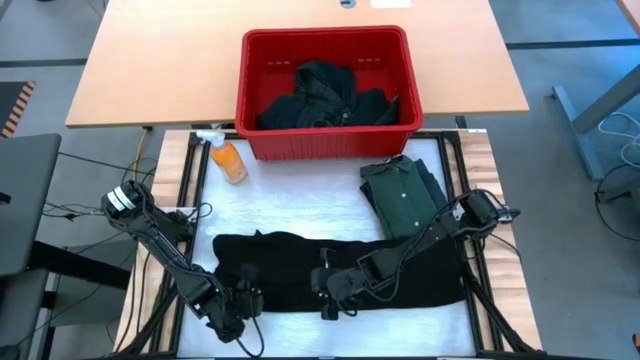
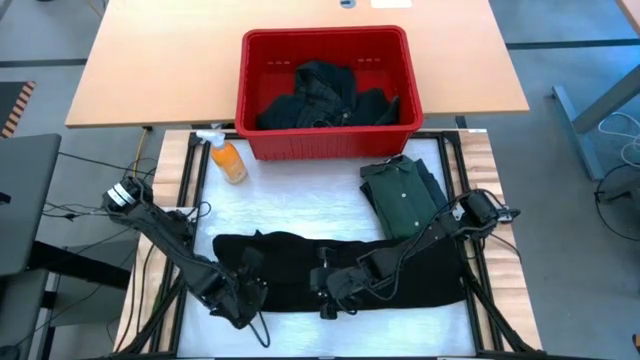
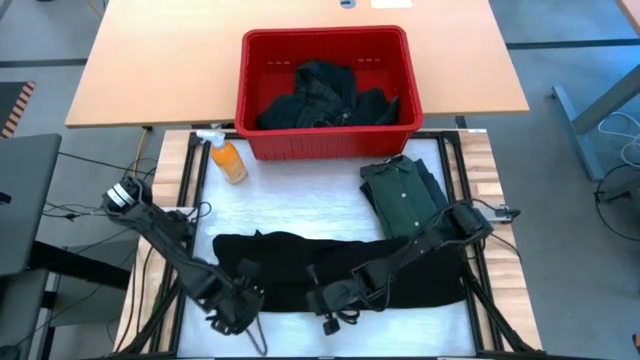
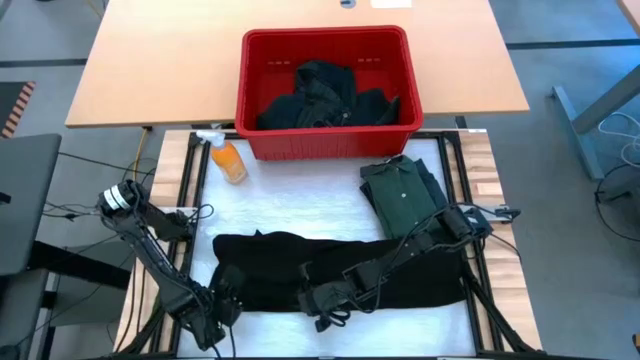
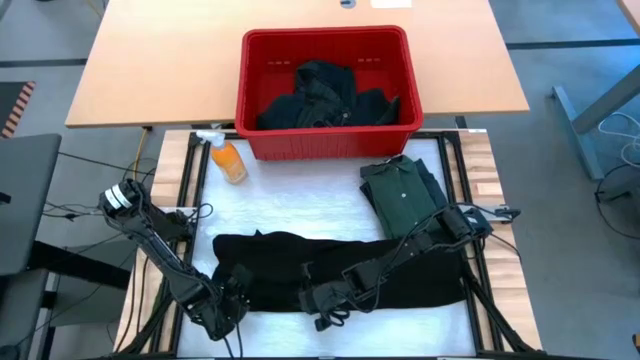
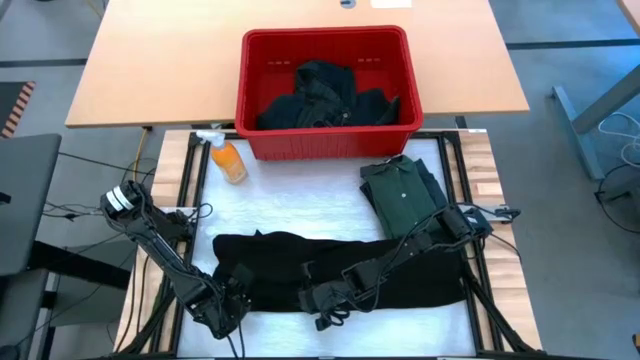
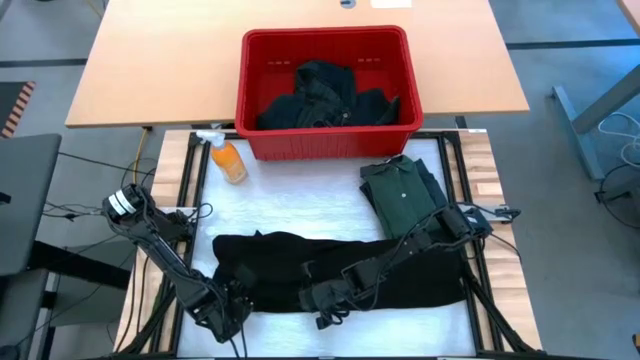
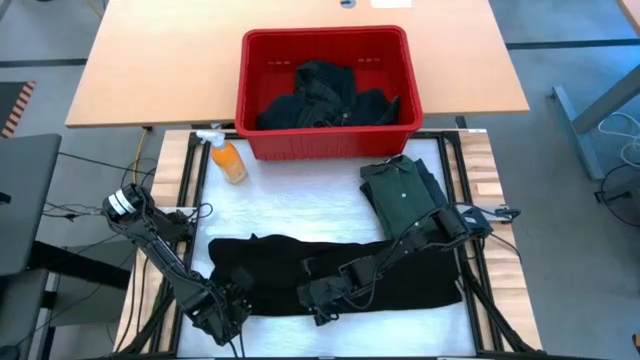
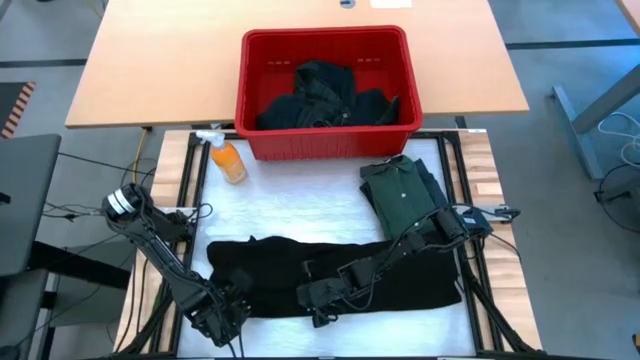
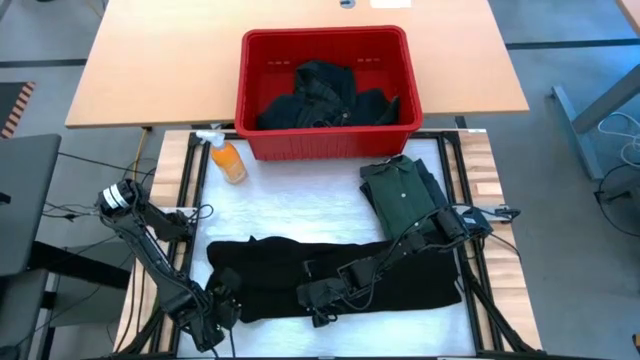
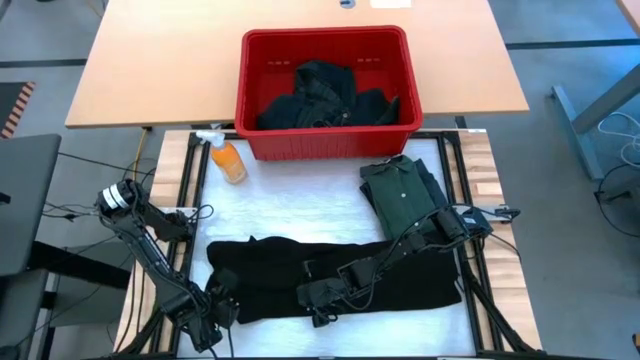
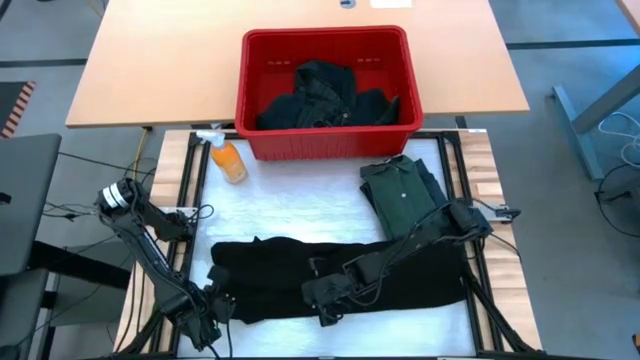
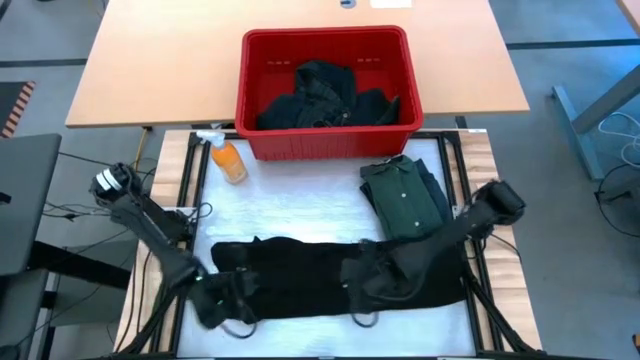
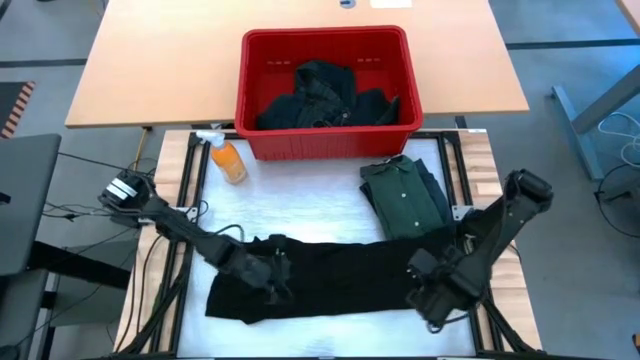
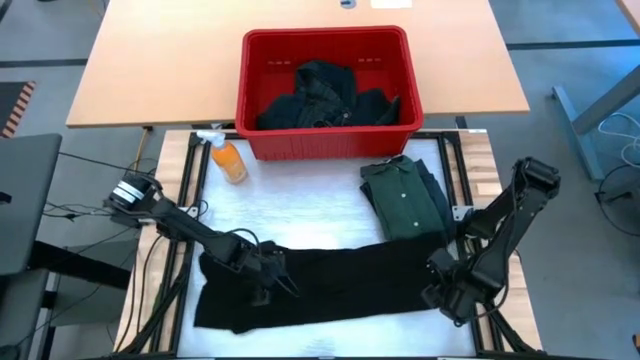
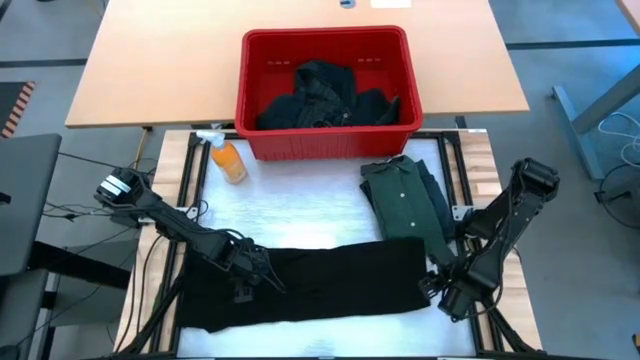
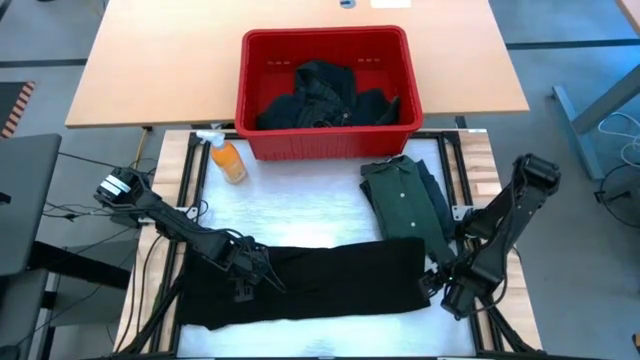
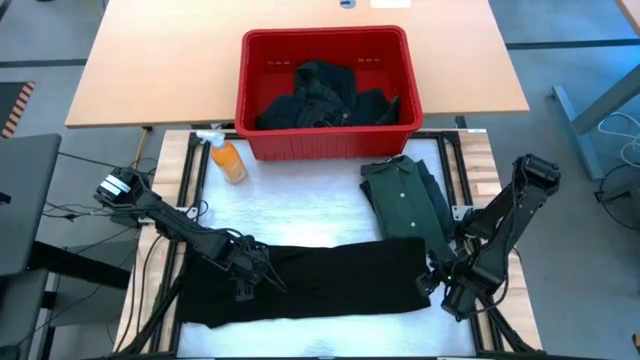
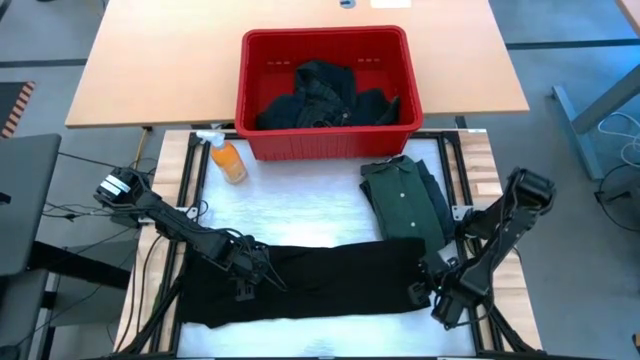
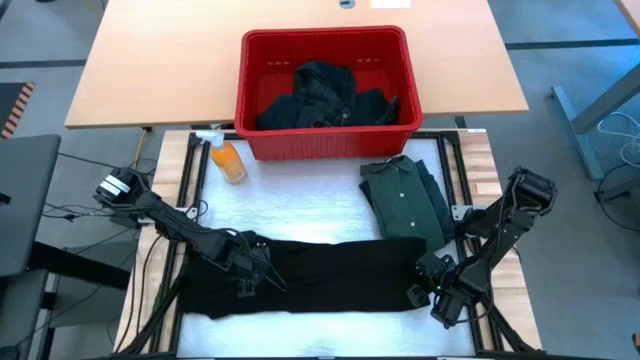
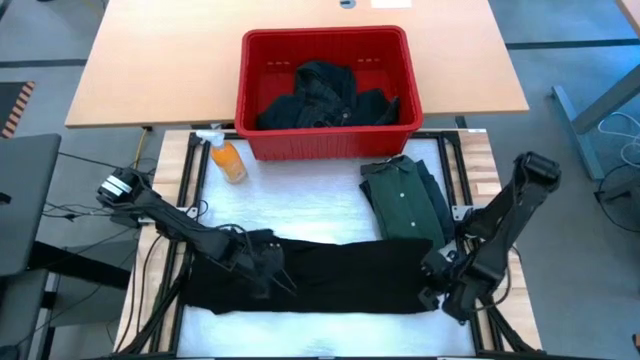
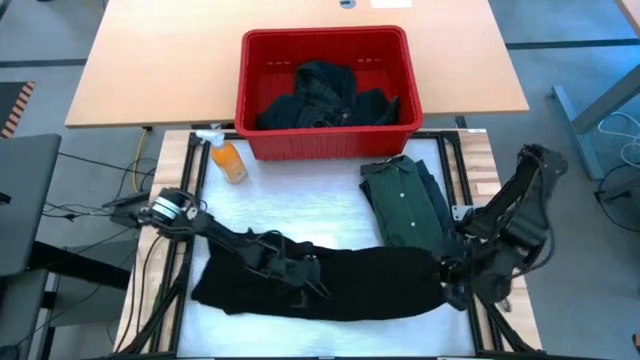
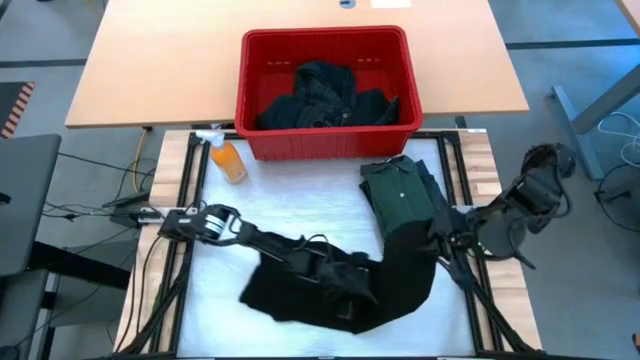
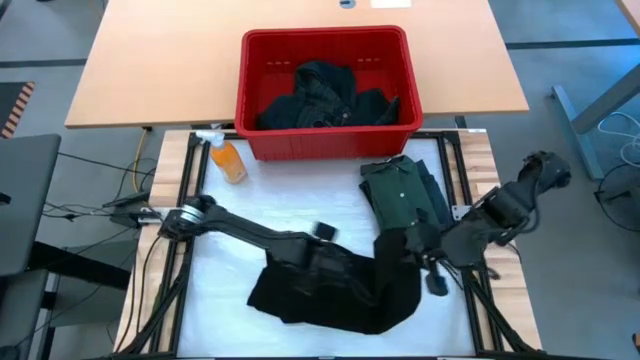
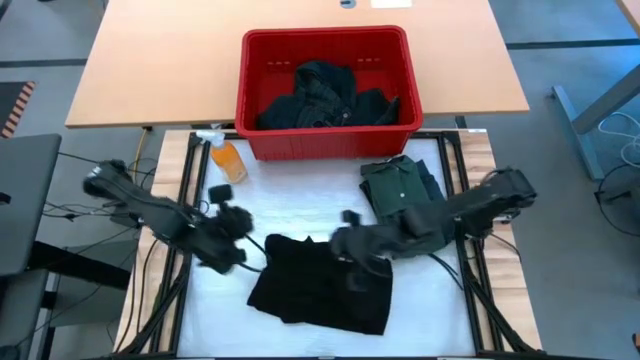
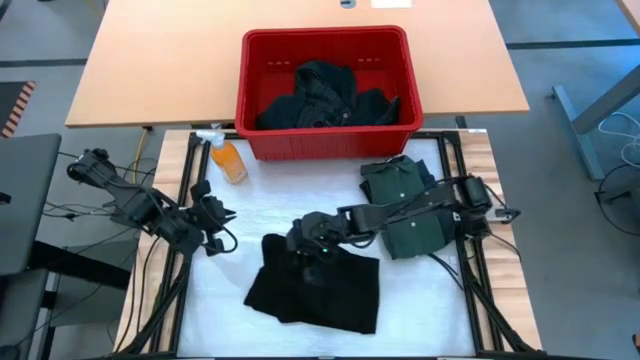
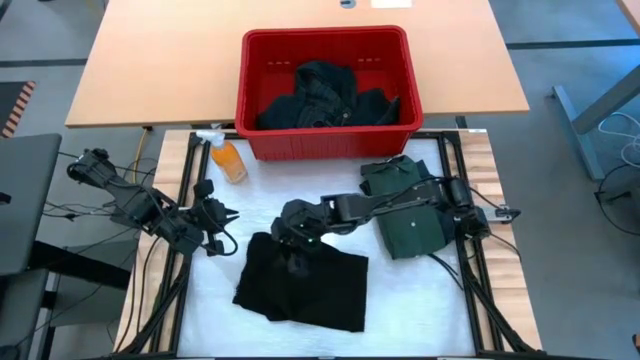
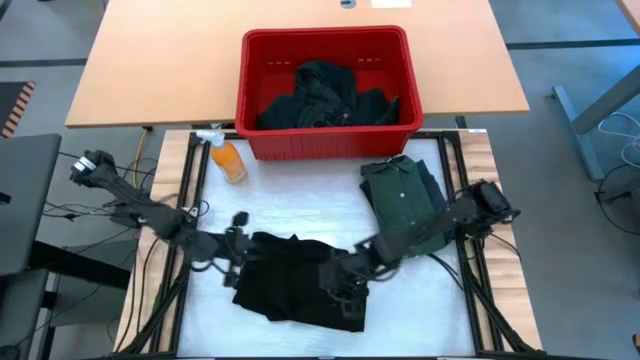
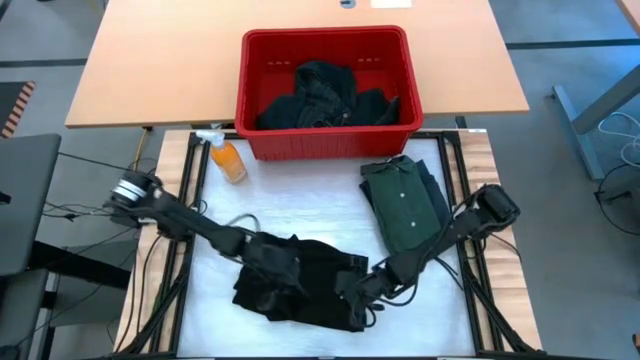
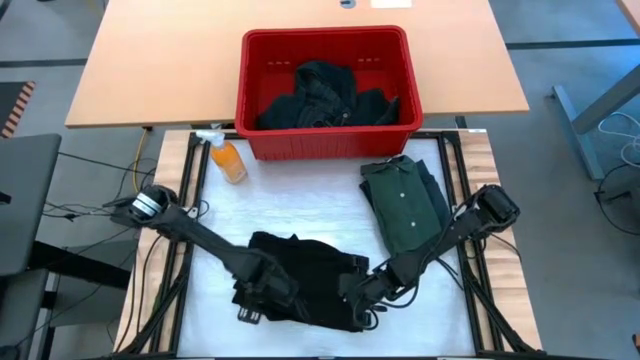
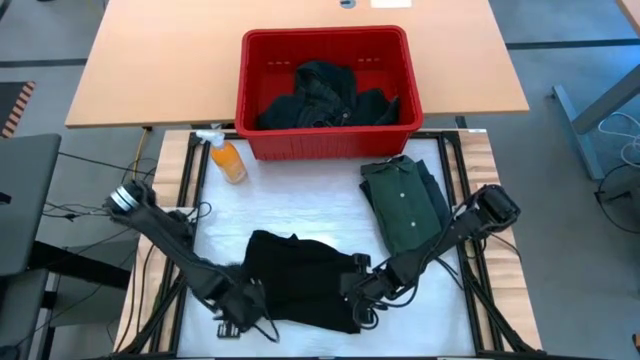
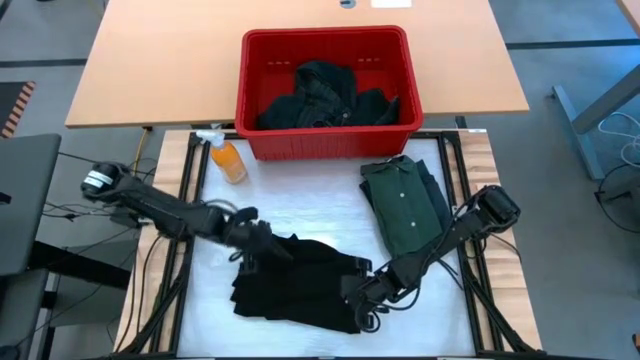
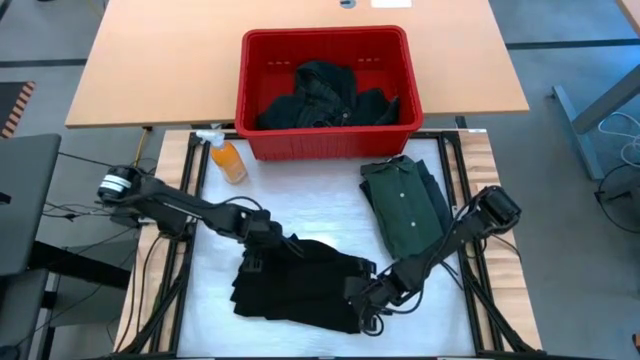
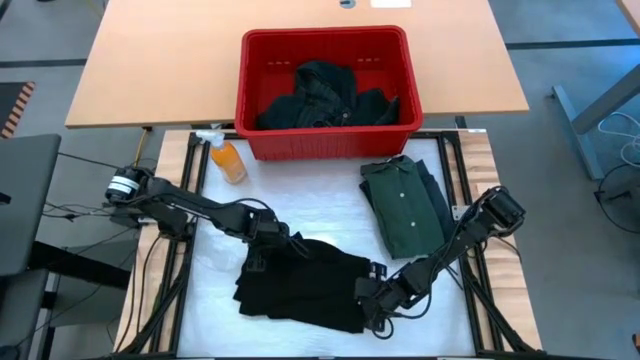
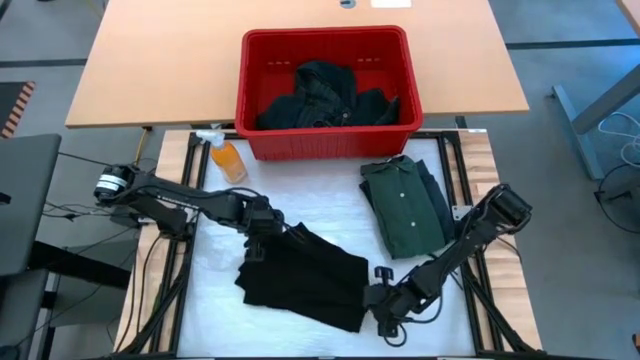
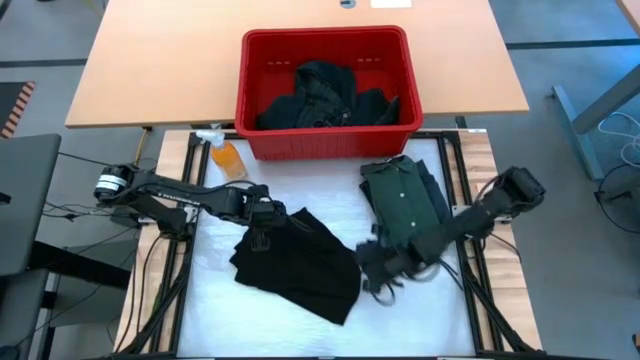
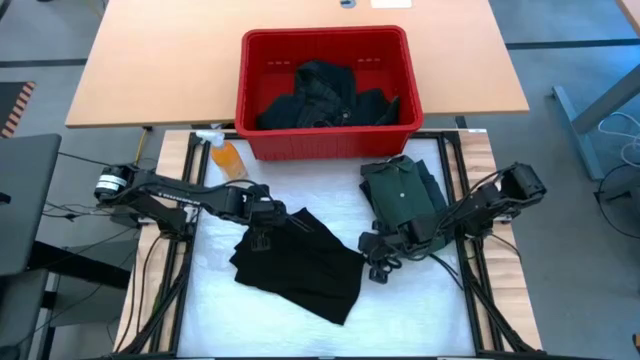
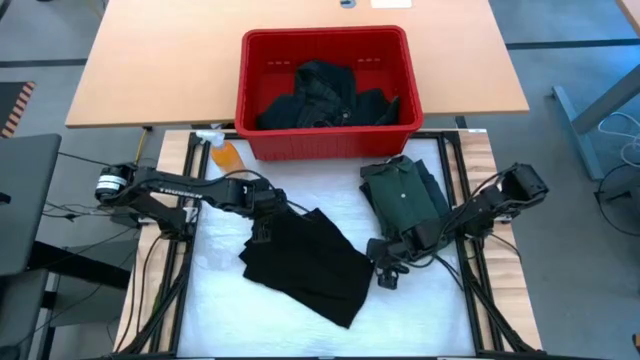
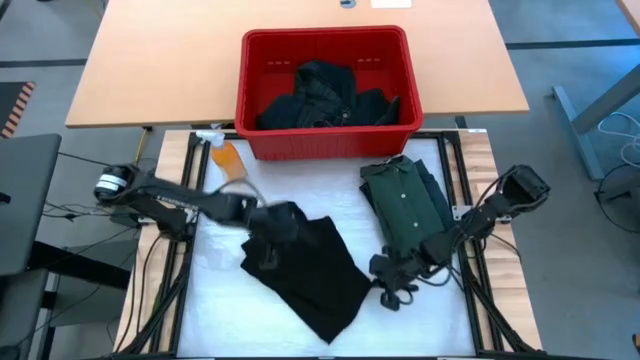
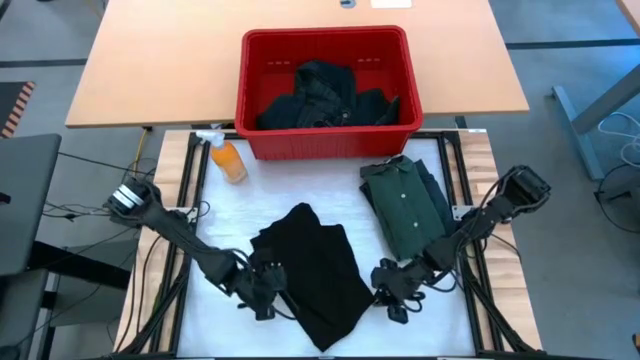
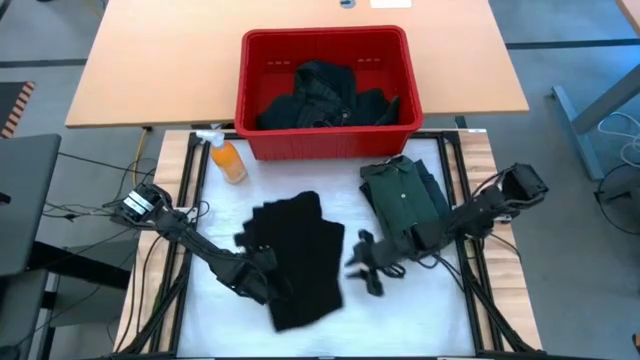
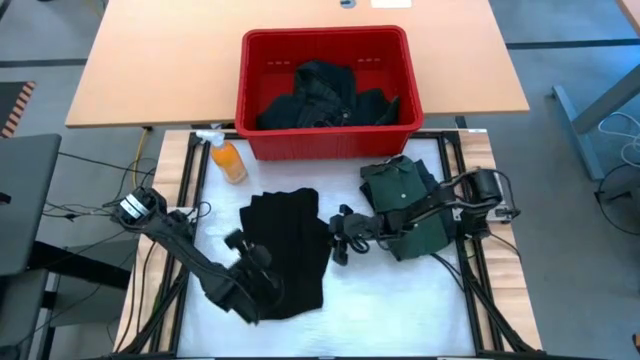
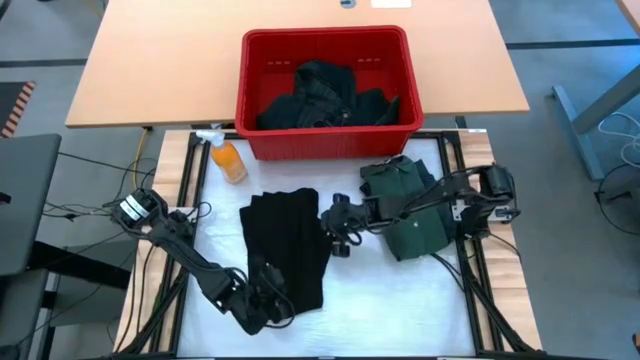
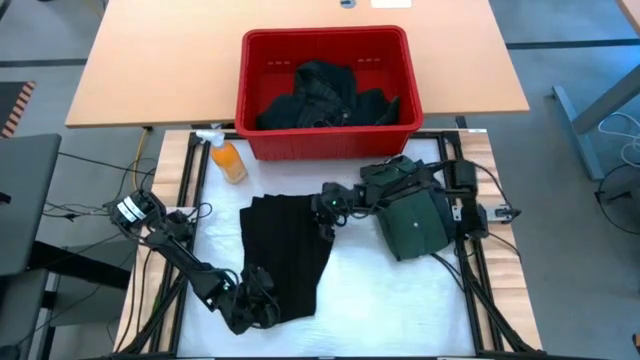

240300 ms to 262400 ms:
Task: Fold laundry
Fold the black shirt
